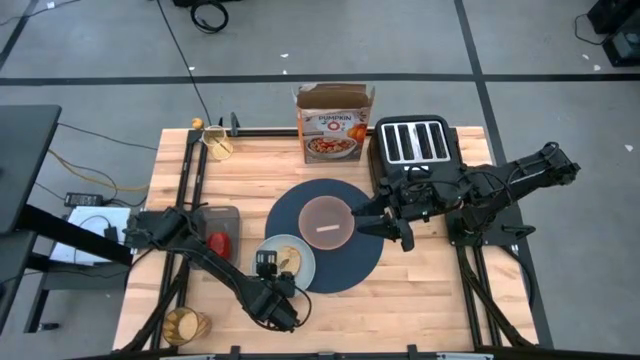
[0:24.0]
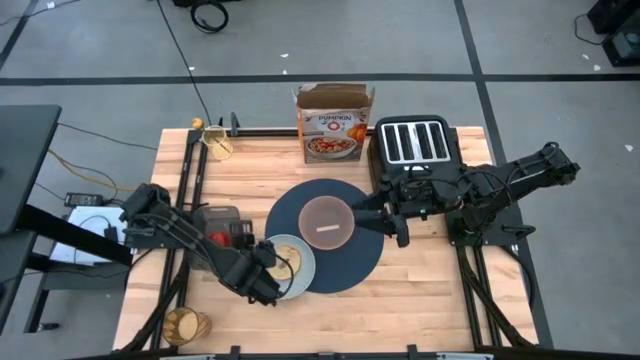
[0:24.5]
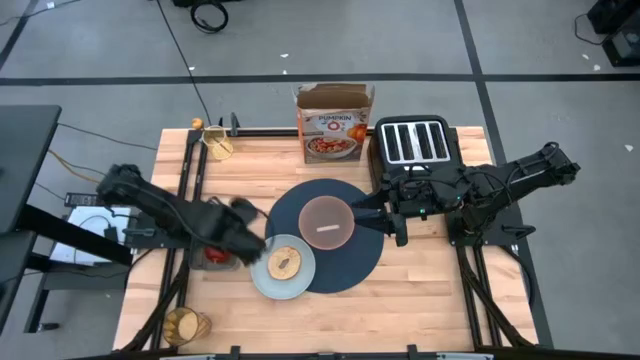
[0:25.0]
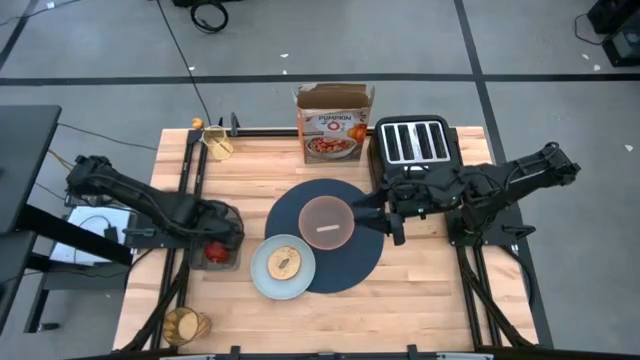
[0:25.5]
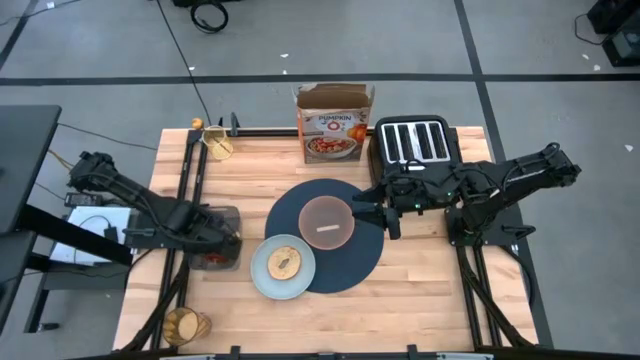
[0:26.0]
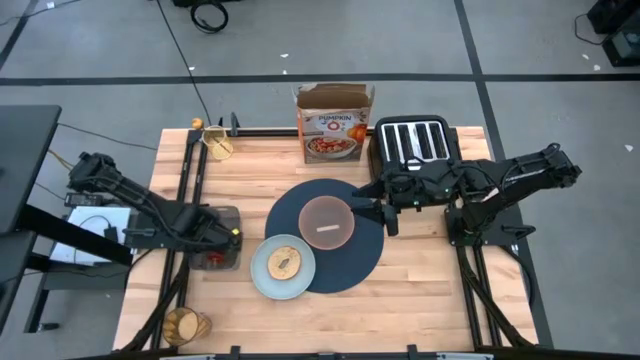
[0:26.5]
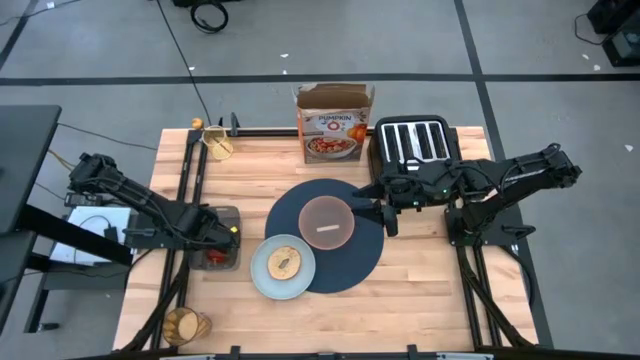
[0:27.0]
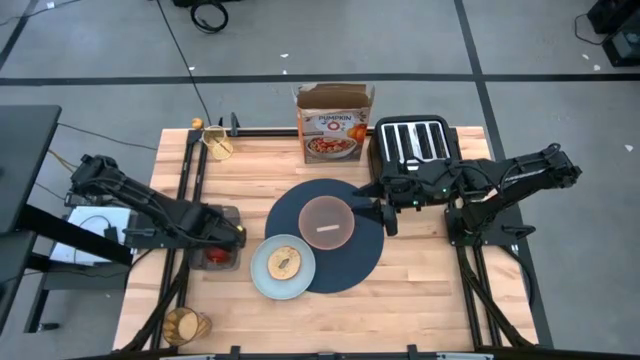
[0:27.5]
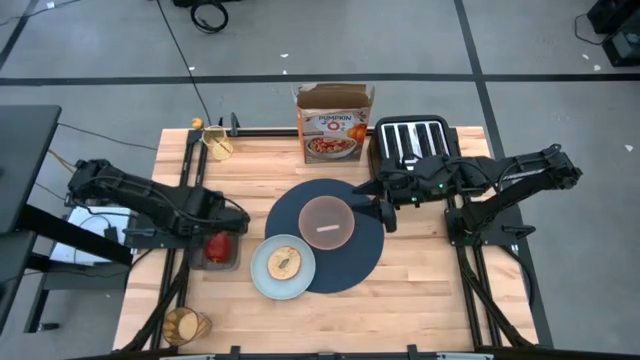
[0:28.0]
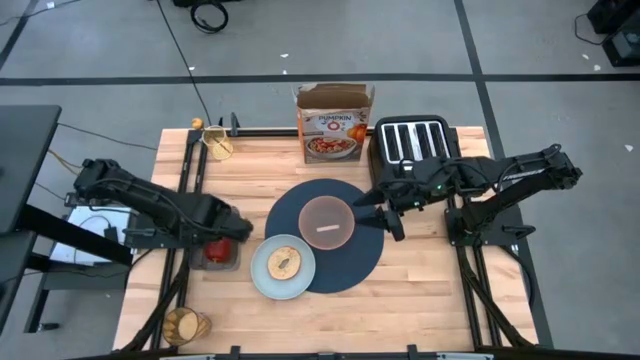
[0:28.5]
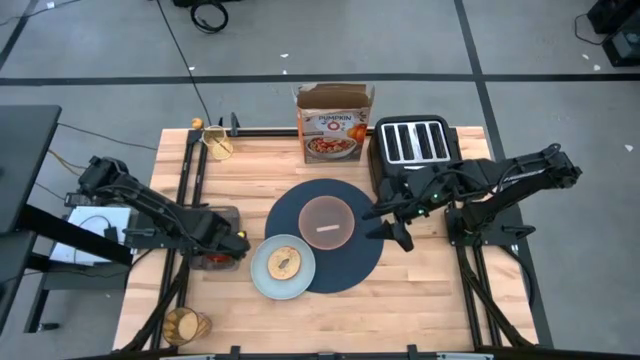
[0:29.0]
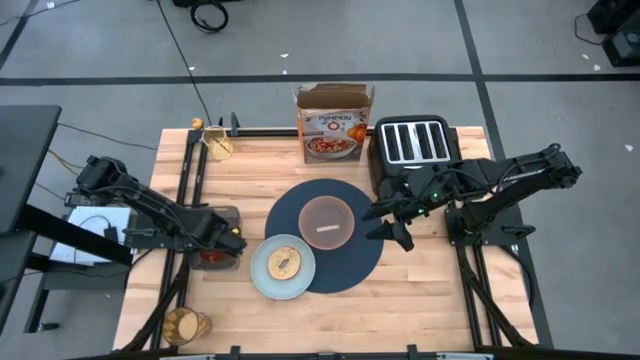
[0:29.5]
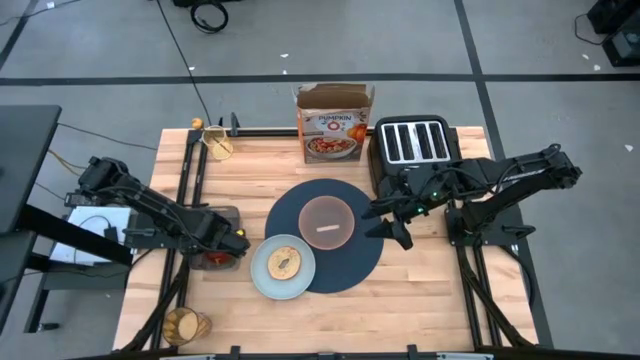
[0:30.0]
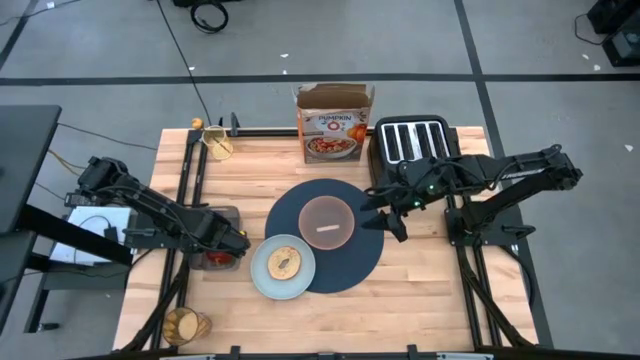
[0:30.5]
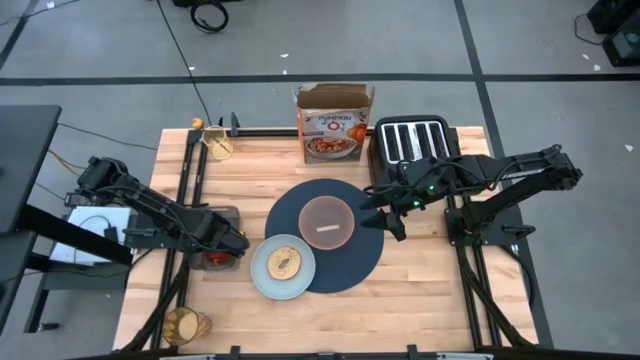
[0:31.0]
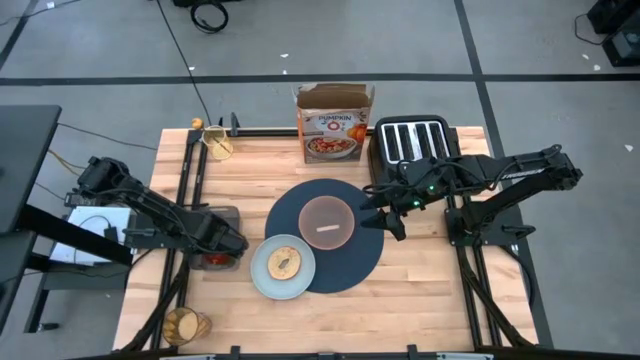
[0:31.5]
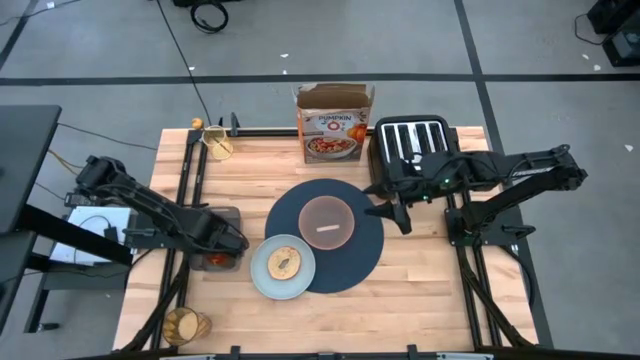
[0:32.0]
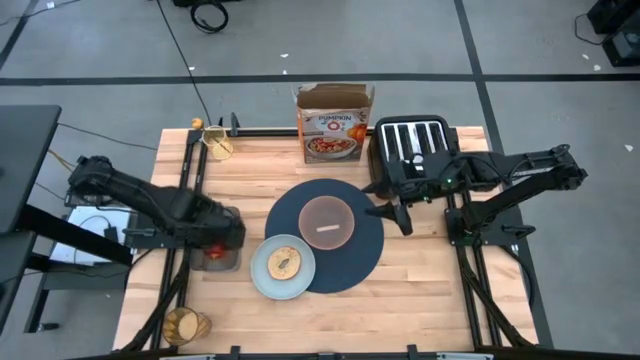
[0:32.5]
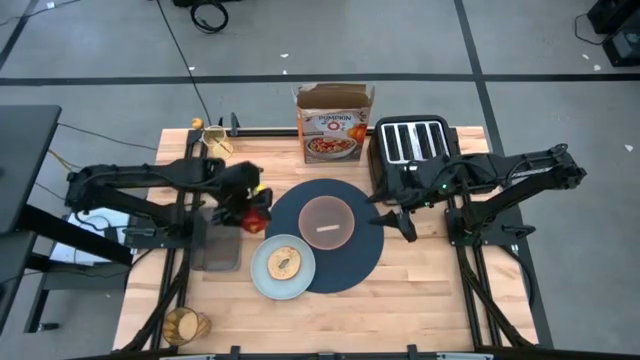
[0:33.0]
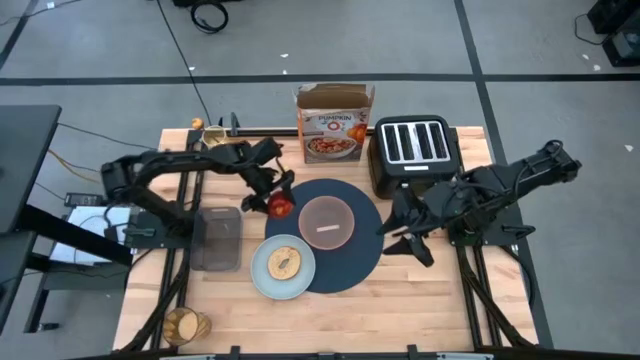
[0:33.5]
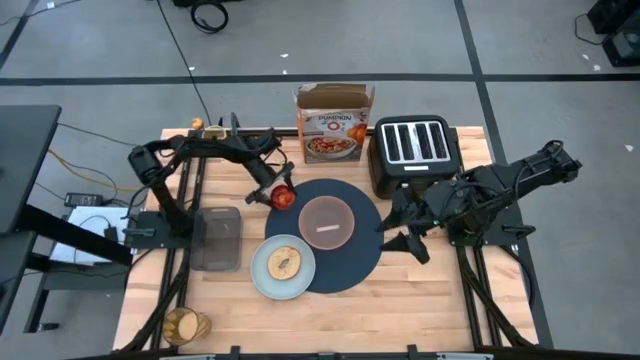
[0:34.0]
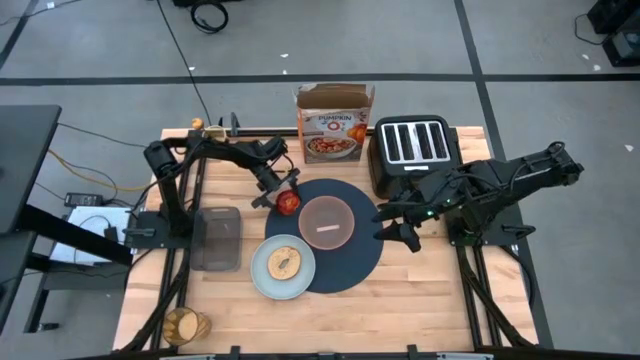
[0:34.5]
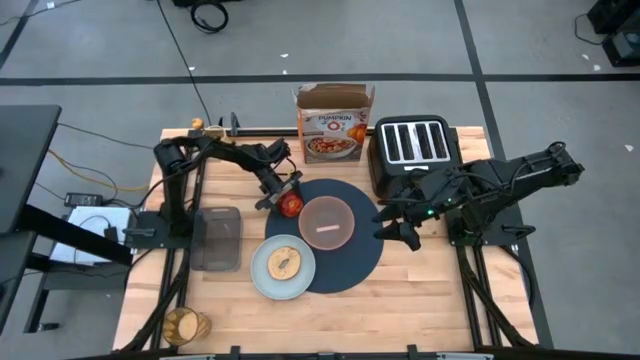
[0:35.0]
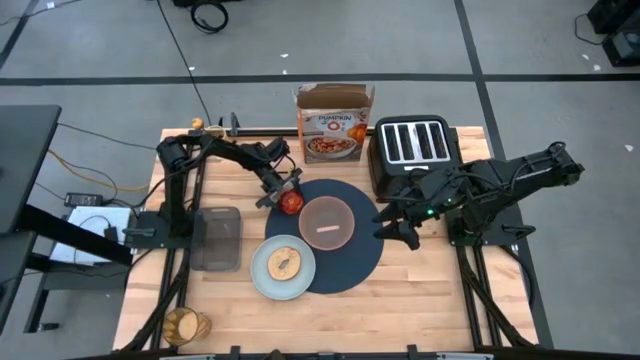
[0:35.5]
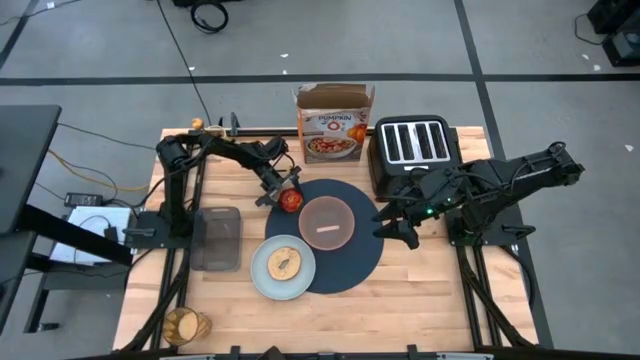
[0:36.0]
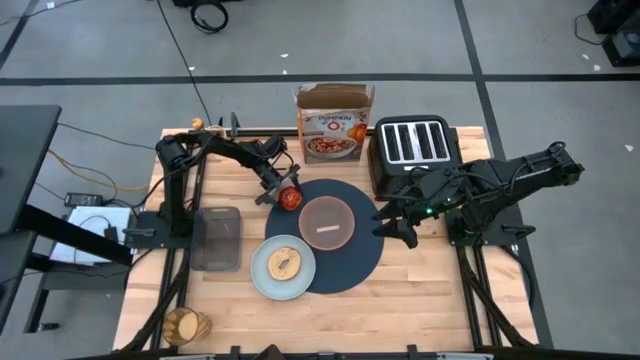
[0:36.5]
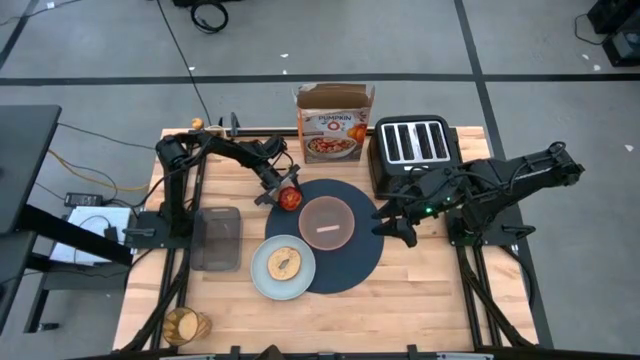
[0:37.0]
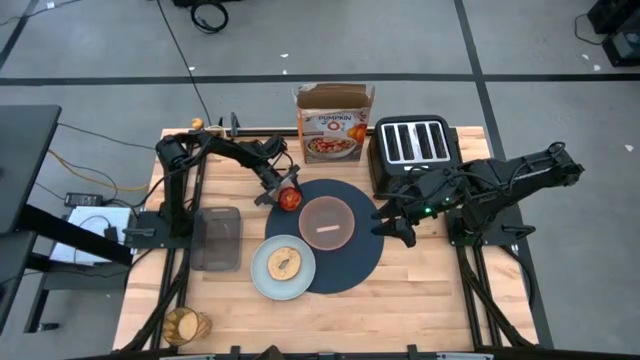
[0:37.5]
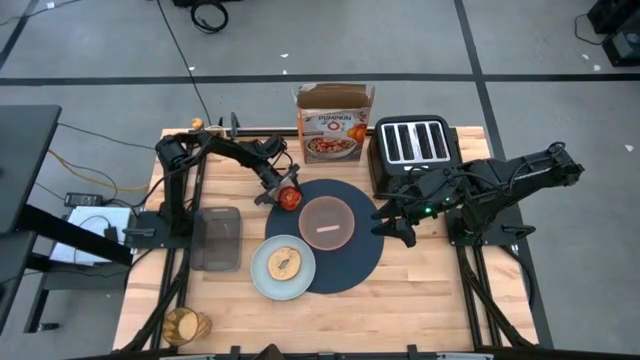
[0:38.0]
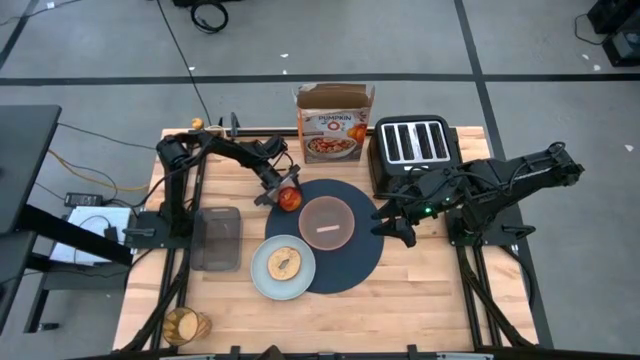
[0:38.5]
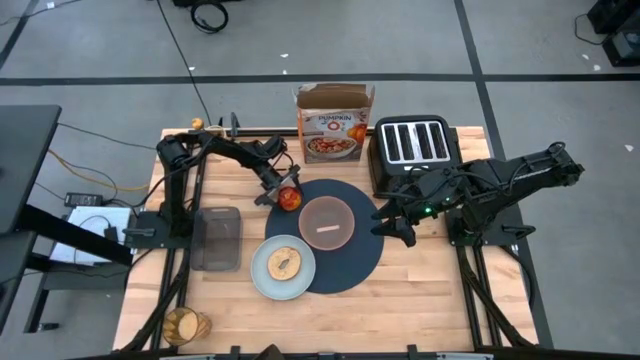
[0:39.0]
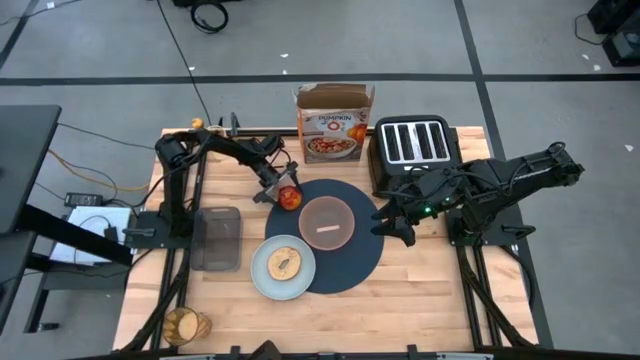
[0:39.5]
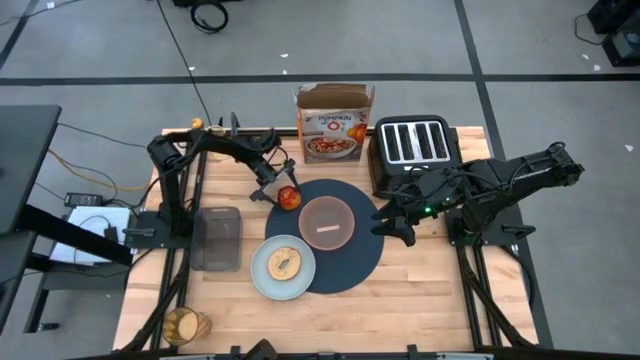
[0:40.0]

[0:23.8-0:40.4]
Task: Arrange a breakfast setting
Put the red apple on the dark blue tablemat to the top left of the orange bowl

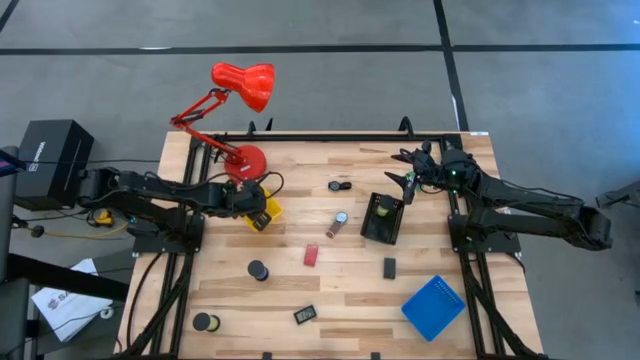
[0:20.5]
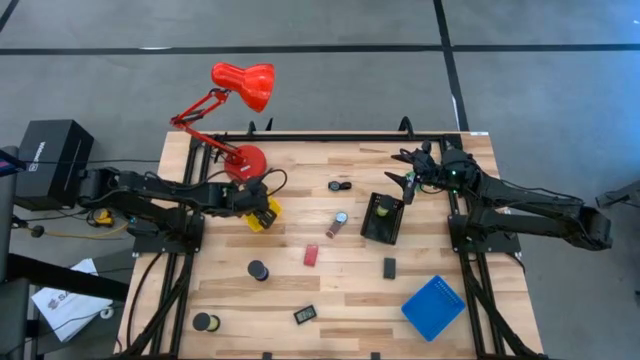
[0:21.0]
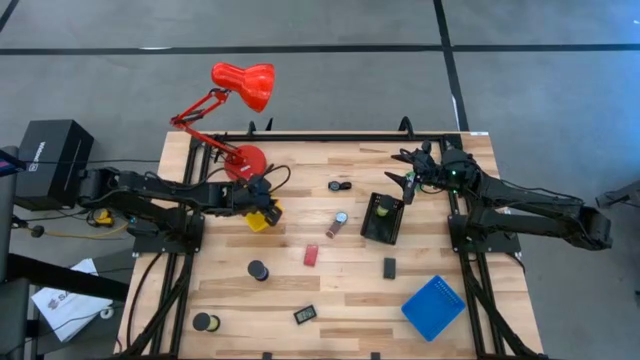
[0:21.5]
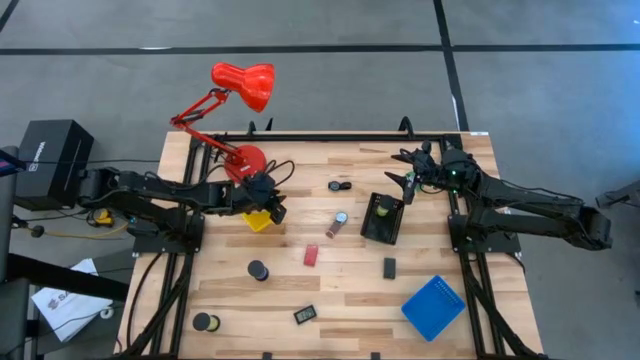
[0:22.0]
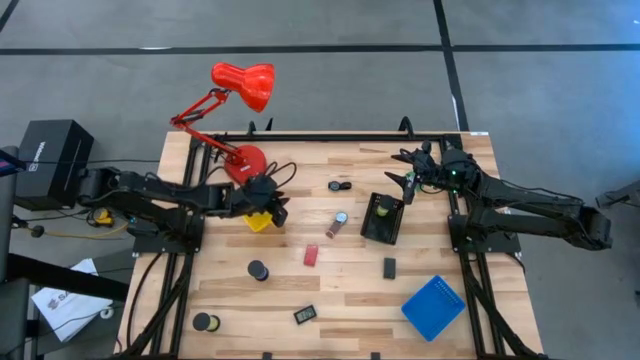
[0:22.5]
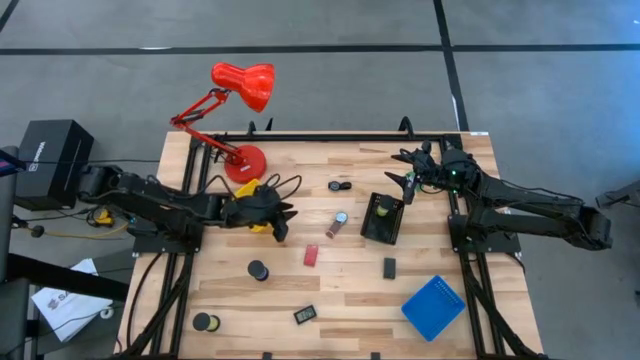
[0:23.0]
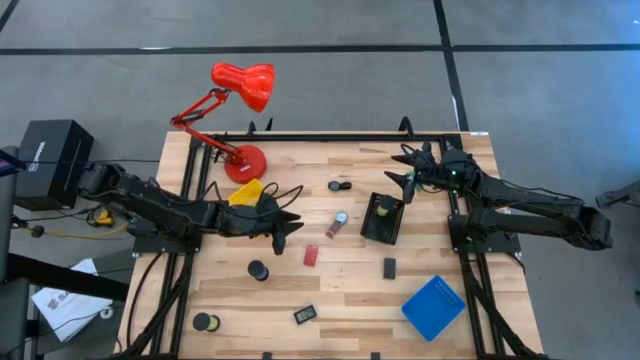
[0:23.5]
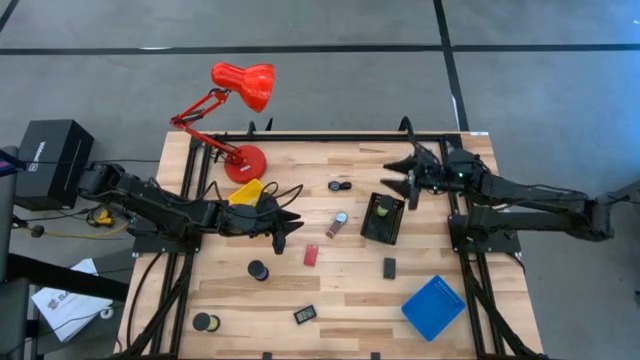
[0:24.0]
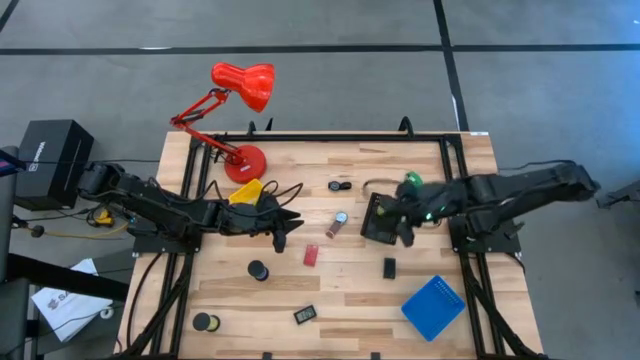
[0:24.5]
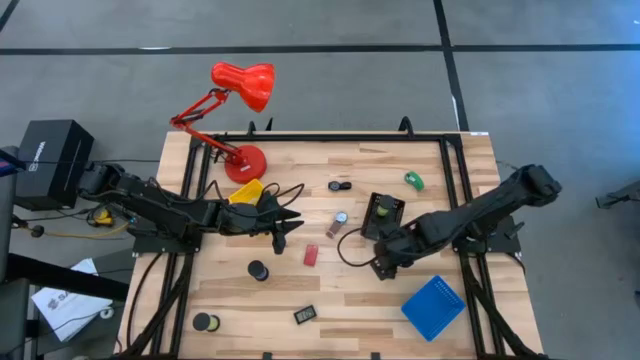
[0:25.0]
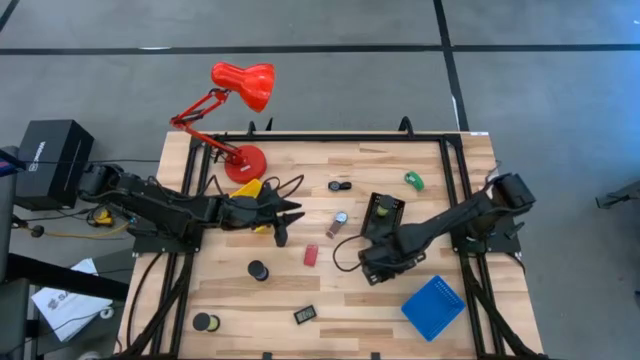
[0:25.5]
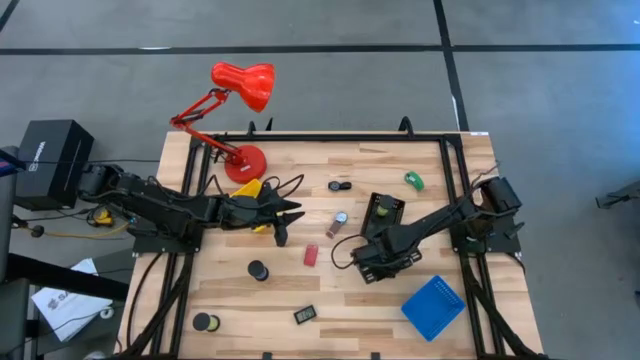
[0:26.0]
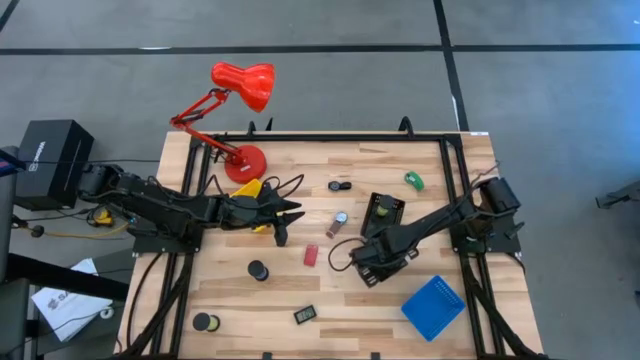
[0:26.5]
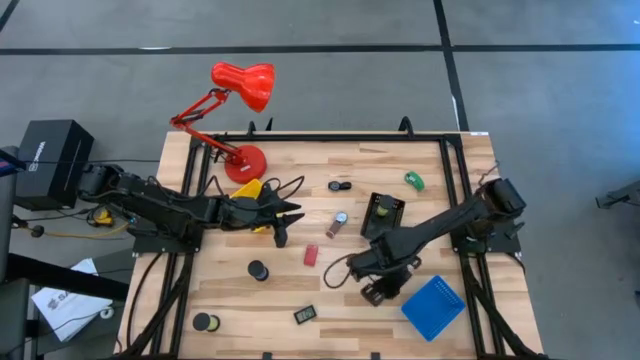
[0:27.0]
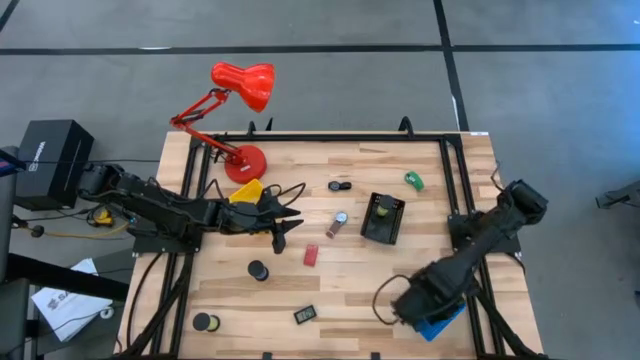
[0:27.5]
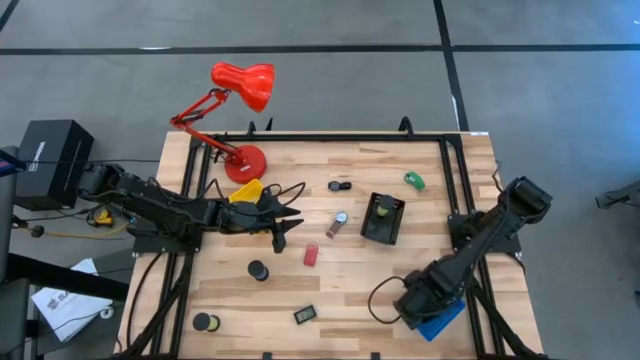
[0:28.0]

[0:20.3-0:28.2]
Task: Pick & Place Office items
Put the top black digital timer into the blue bin
